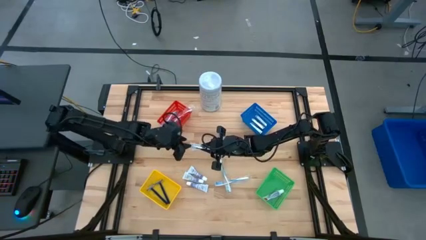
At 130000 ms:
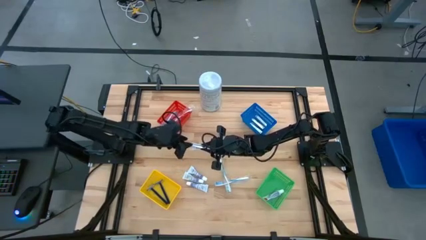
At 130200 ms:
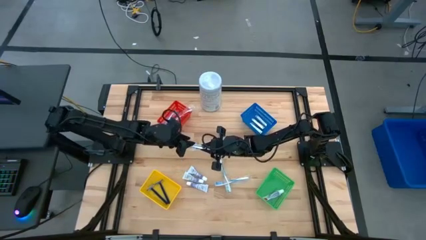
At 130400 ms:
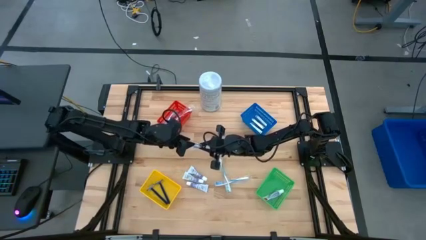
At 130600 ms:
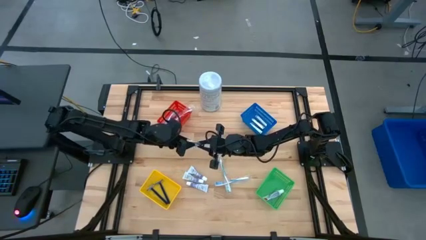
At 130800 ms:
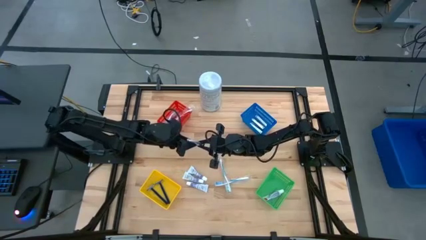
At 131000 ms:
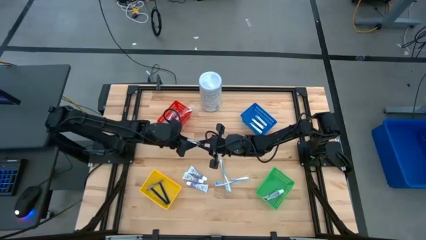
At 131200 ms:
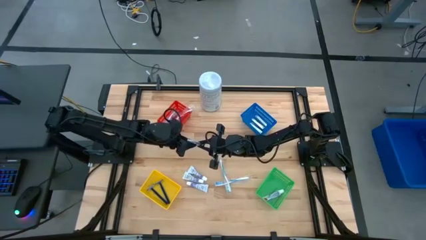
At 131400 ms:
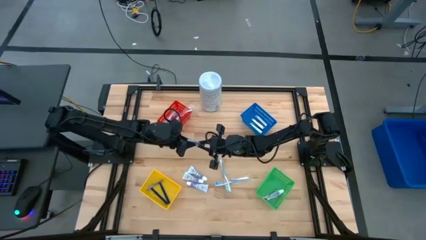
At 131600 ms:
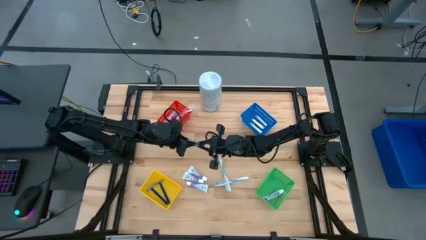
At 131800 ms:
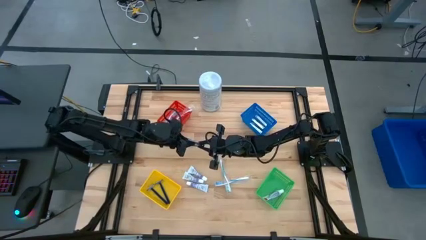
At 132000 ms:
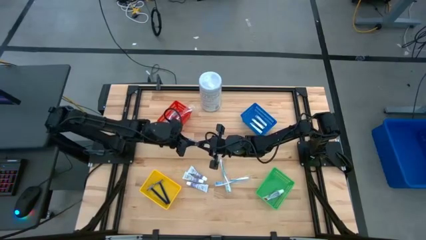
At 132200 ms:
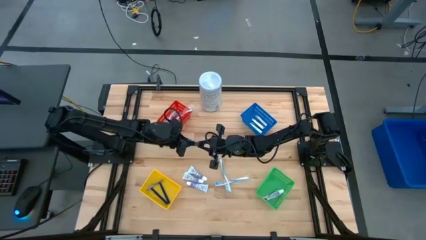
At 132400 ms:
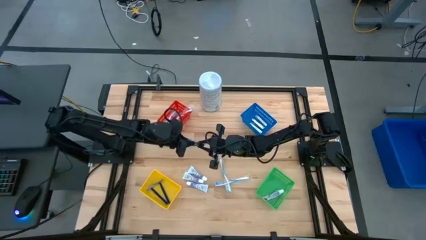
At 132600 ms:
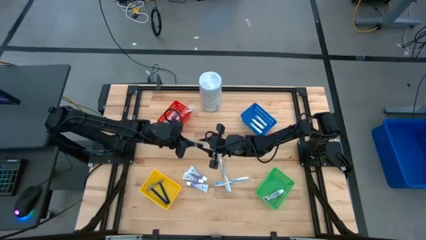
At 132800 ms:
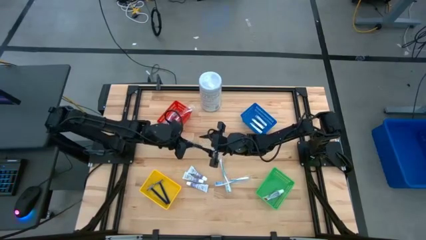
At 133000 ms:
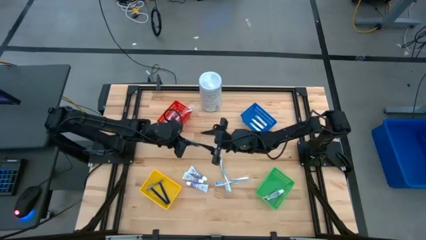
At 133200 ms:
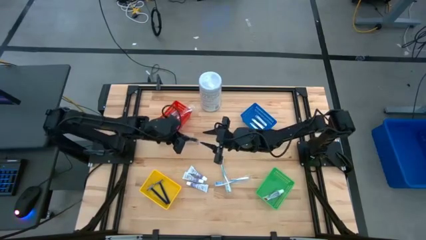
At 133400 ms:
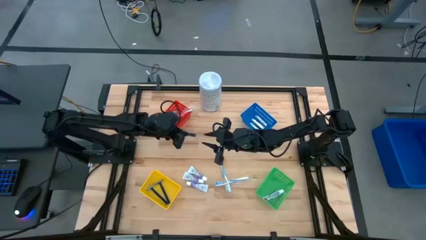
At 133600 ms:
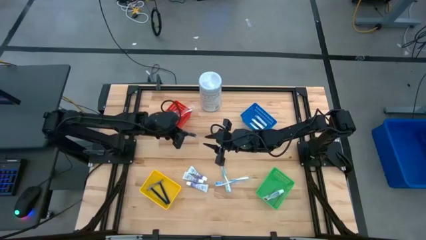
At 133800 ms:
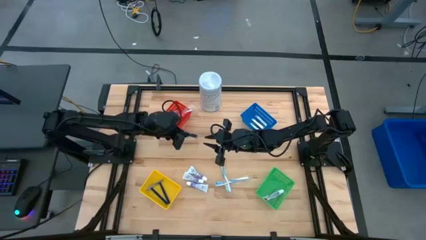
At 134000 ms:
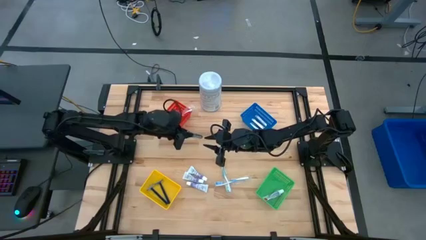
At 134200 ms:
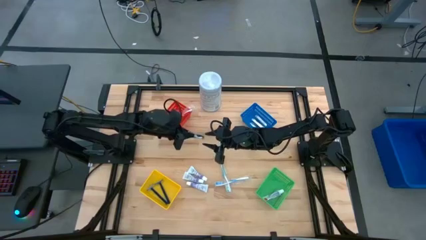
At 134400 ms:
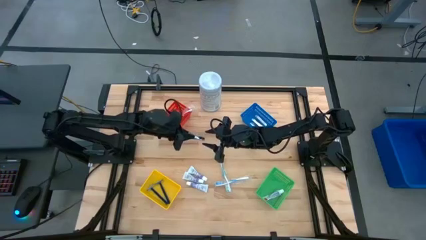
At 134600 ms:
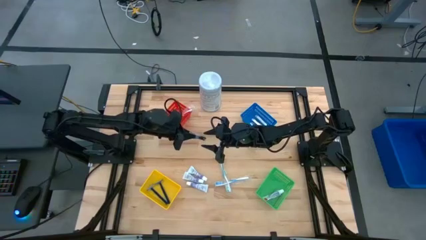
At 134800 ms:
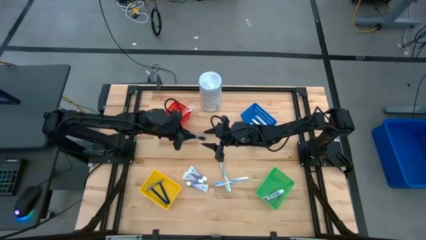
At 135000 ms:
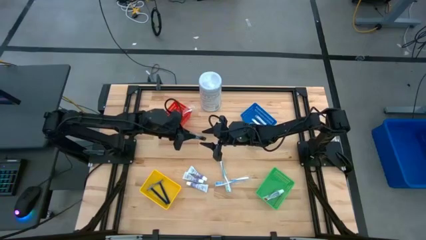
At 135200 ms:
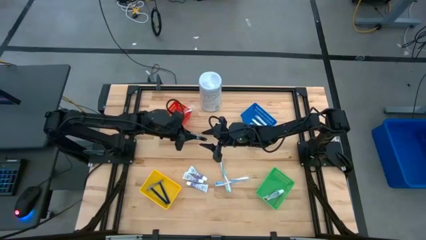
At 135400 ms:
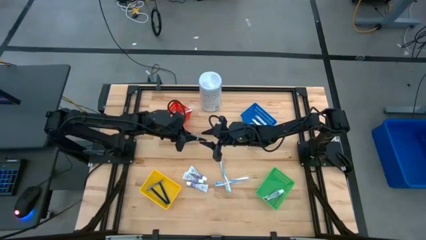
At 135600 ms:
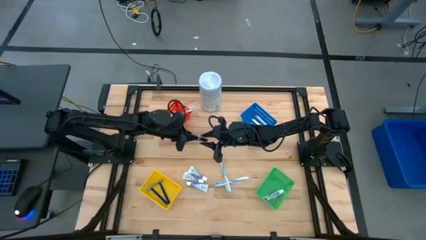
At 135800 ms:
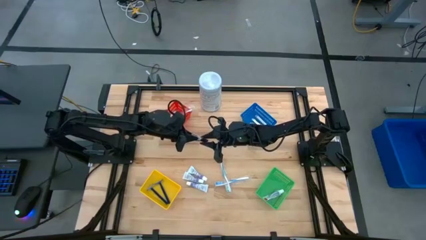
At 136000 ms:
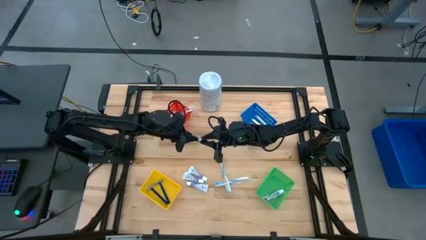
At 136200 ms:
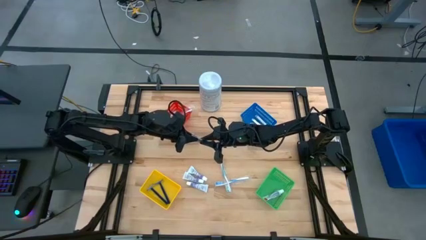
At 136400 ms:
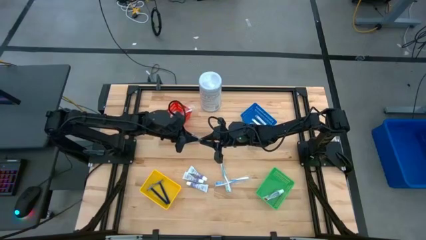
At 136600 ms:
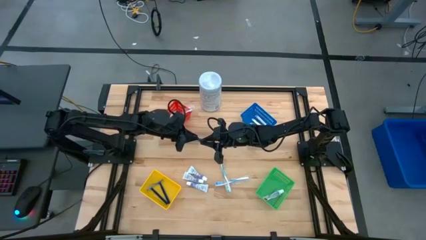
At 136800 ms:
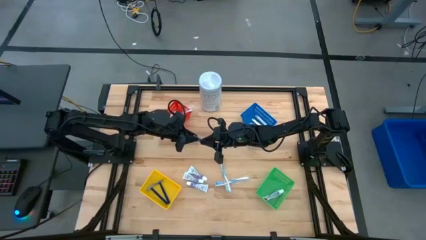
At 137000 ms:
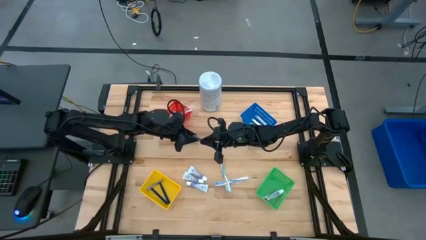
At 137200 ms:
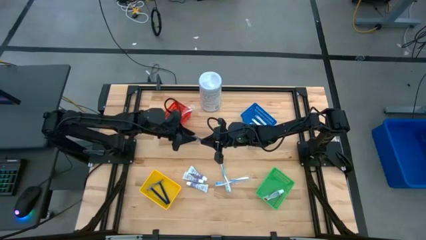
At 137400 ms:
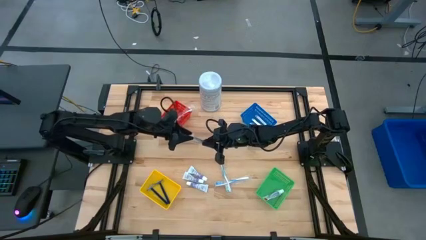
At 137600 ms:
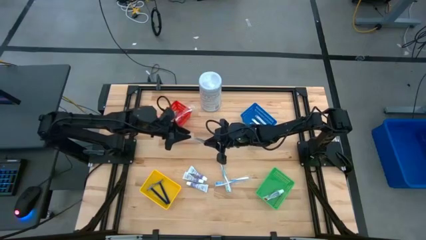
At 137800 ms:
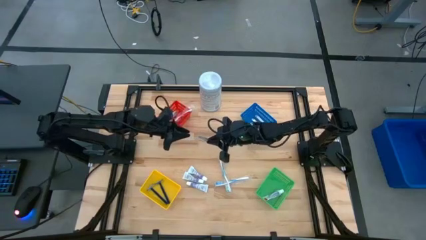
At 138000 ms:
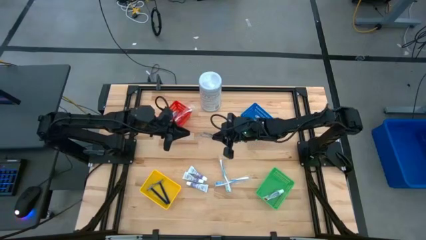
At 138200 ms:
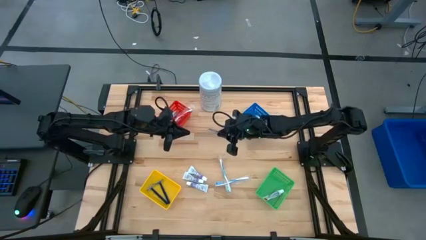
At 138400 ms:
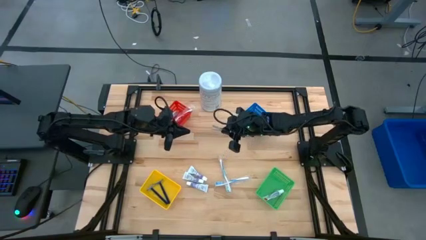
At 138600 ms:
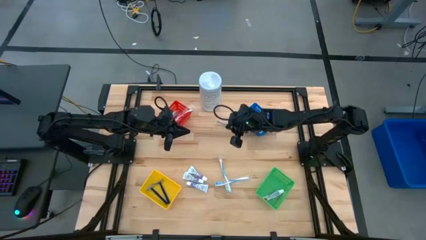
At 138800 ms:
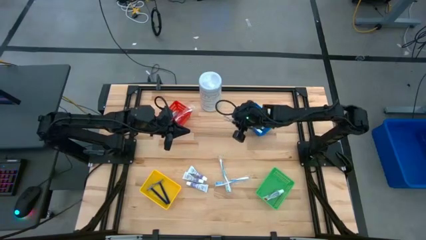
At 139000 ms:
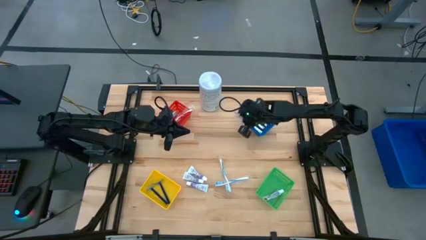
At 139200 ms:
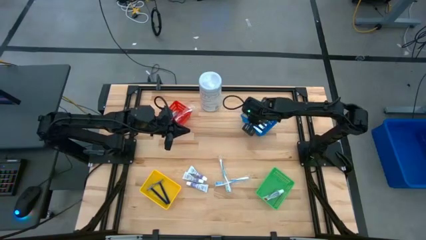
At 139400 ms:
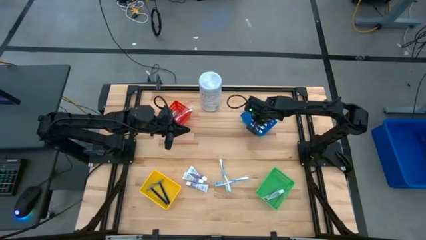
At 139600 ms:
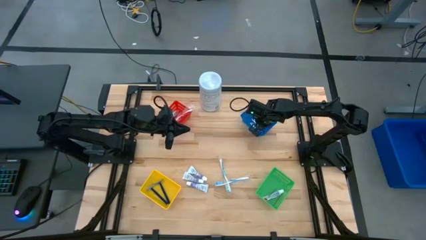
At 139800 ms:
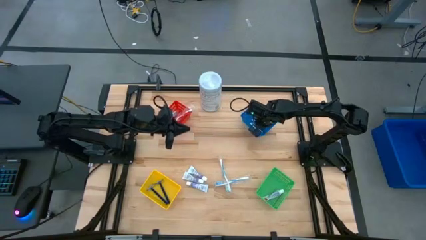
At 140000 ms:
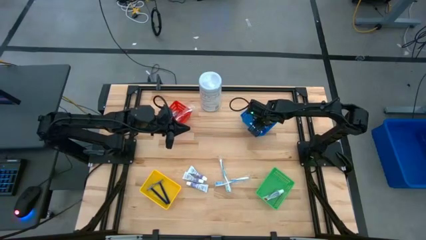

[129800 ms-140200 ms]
Task: Pick & Place Travel size toiletries
Put the silver nail clipper into the blue basket

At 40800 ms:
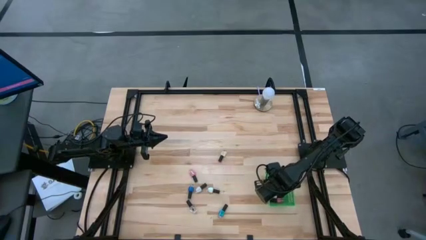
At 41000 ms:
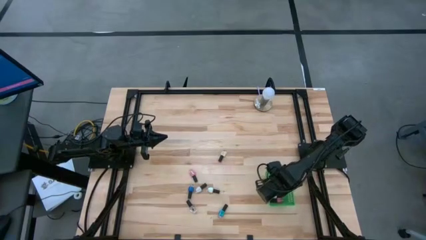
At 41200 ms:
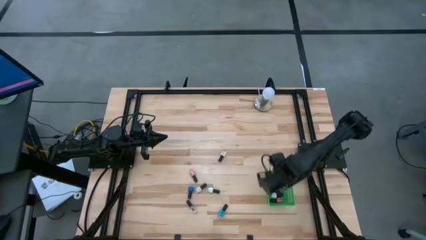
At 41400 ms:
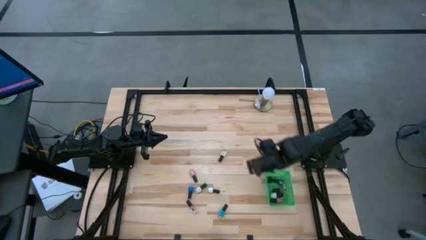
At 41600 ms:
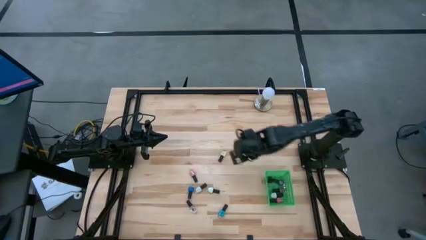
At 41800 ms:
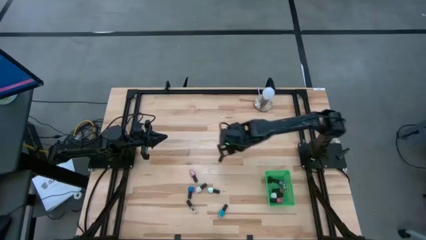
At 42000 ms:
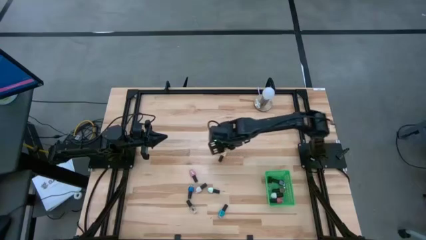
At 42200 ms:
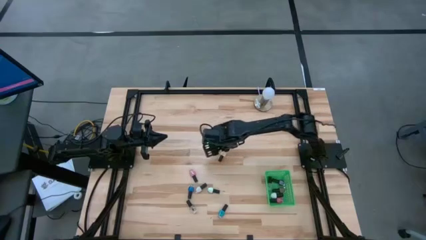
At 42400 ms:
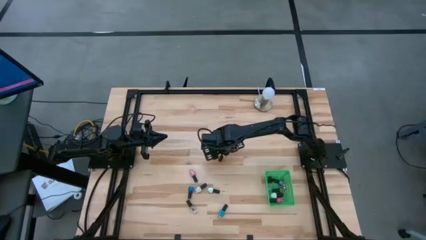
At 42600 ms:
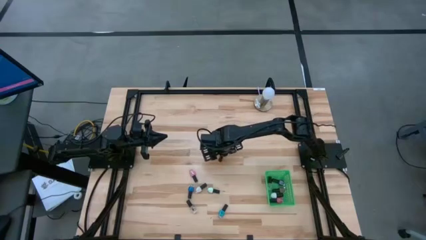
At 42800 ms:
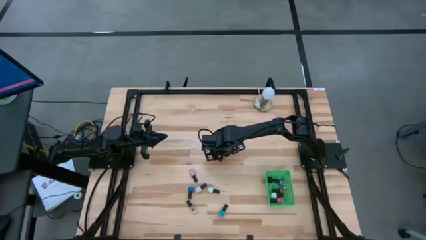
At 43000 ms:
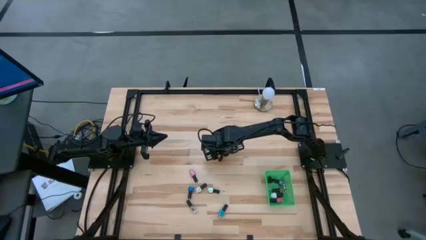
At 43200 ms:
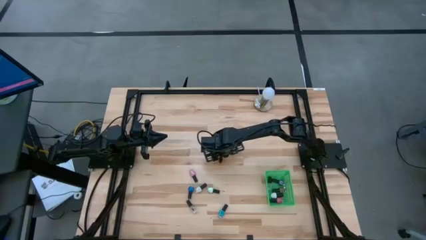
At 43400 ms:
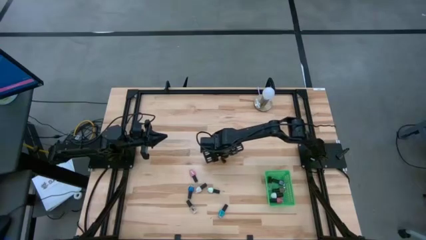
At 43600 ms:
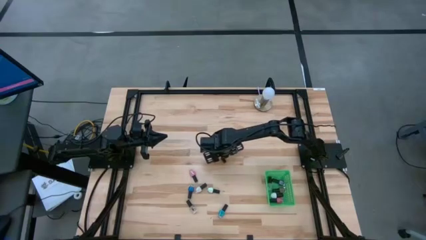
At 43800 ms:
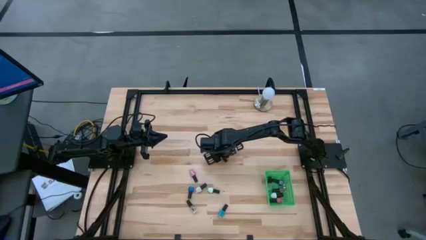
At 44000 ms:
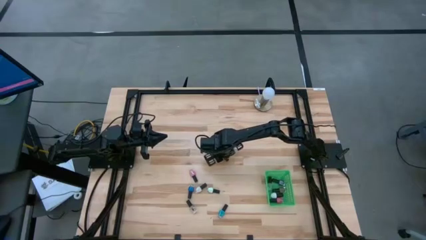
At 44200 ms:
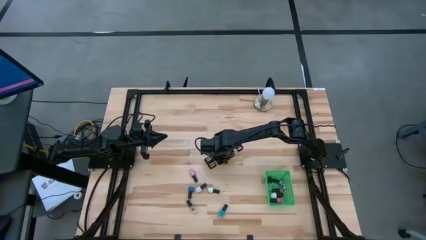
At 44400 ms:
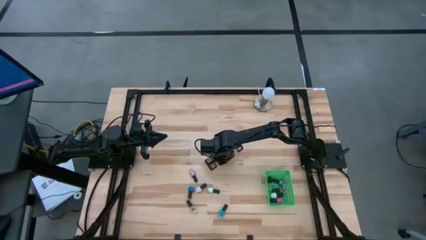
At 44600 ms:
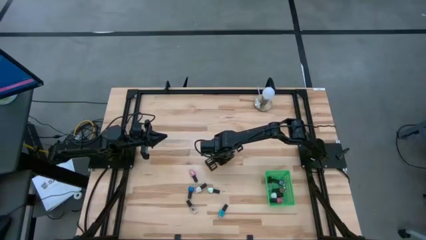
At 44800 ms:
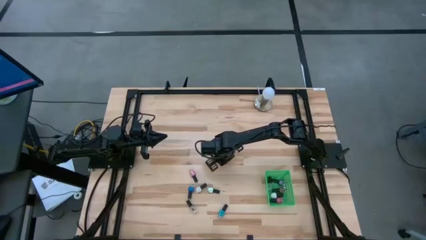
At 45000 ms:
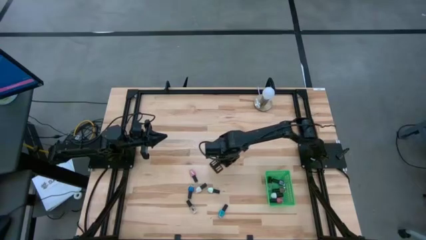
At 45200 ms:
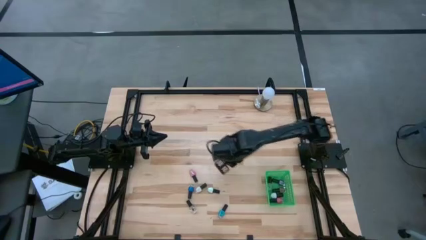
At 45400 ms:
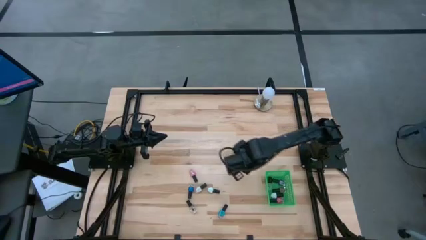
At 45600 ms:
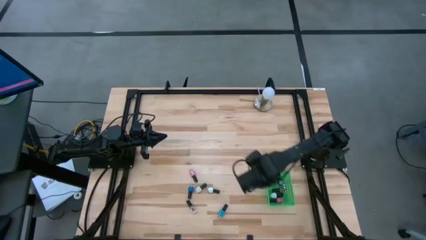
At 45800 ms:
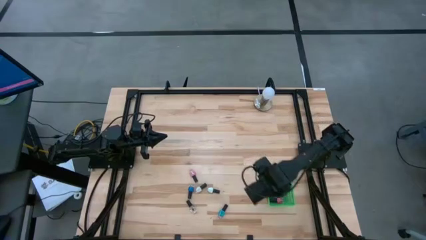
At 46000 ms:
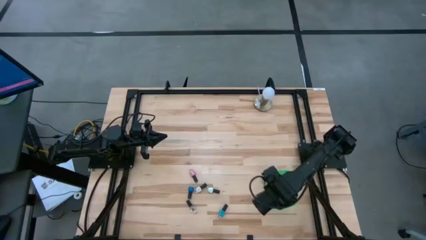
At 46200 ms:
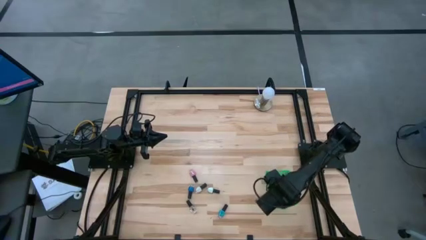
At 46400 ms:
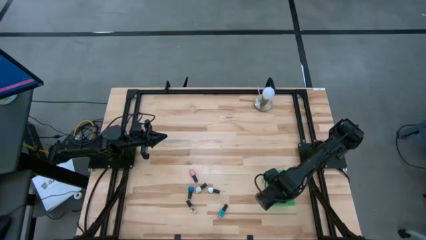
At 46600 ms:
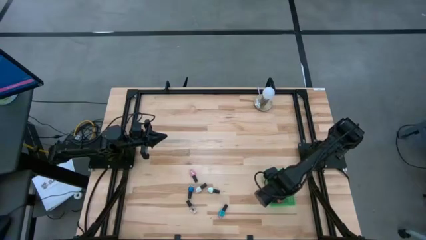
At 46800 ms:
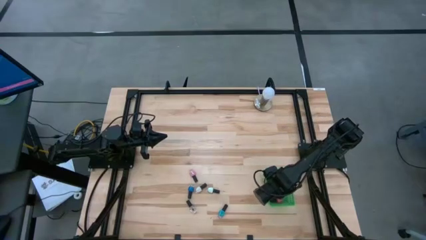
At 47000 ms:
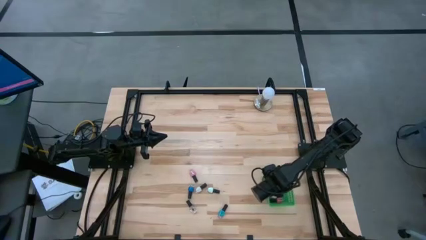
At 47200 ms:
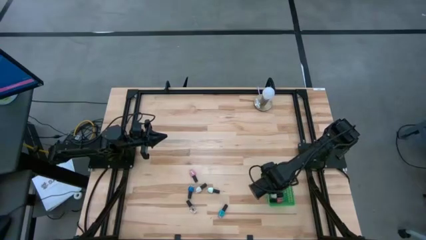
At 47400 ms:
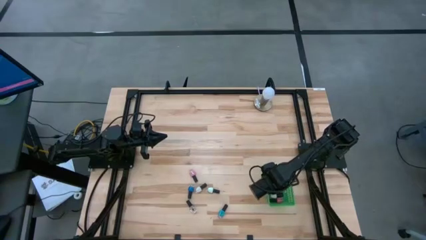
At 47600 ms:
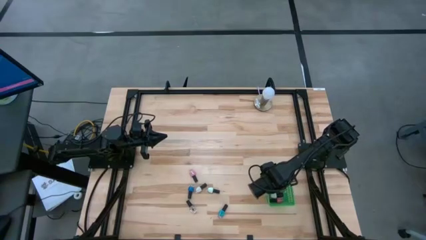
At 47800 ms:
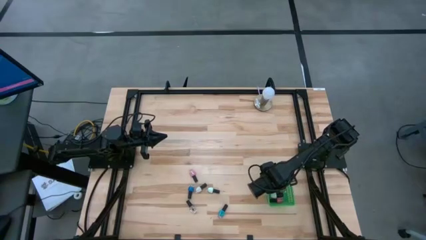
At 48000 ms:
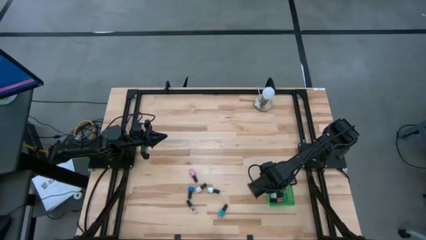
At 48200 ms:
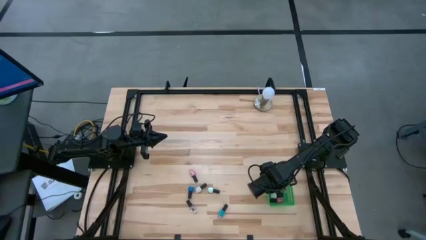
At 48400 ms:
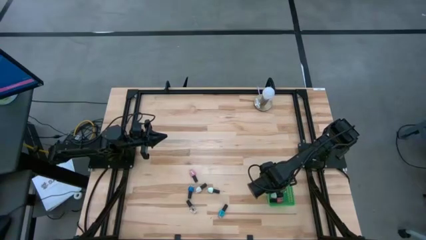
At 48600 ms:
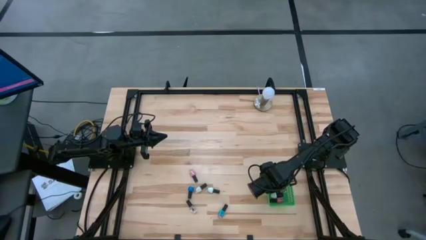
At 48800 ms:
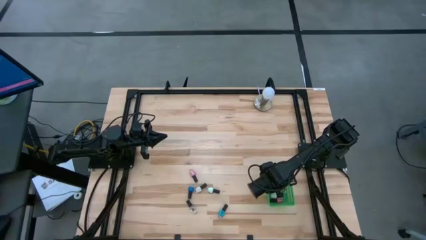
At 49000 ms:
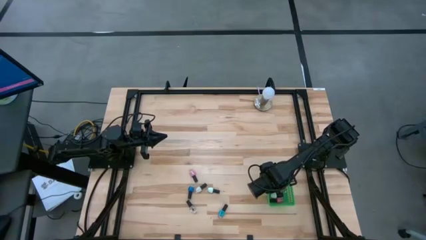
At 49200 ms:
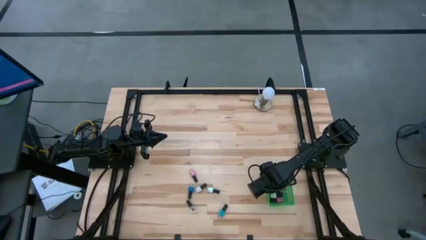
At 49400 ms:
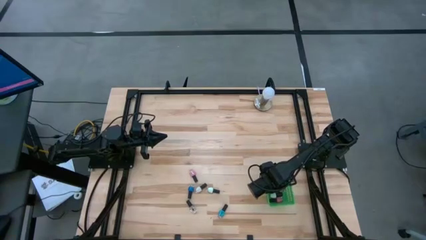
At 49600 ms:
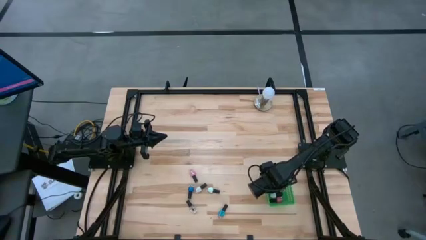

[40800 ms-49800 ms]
Task: Pick & Place Nail Polish
Put the yellow nail polish into the green bin
